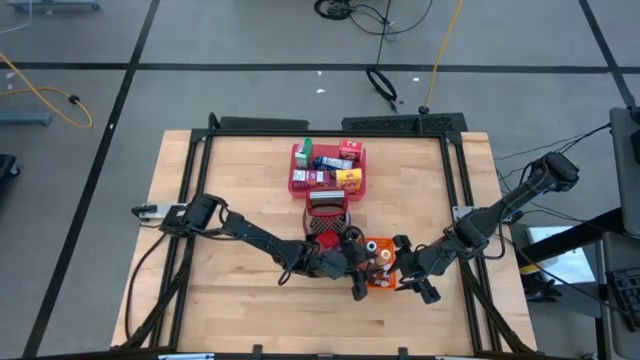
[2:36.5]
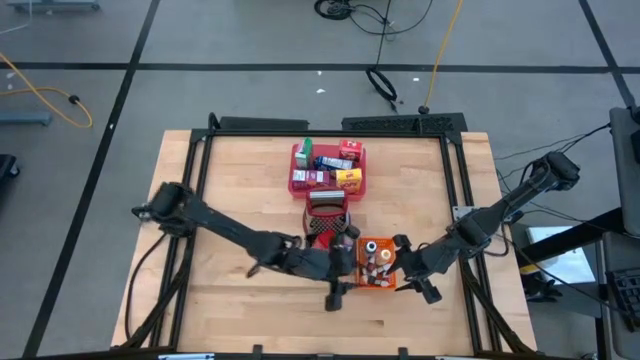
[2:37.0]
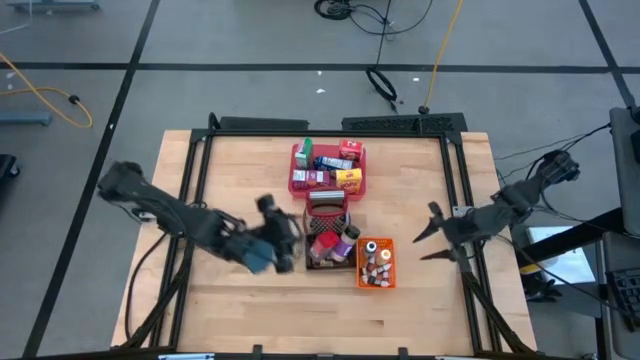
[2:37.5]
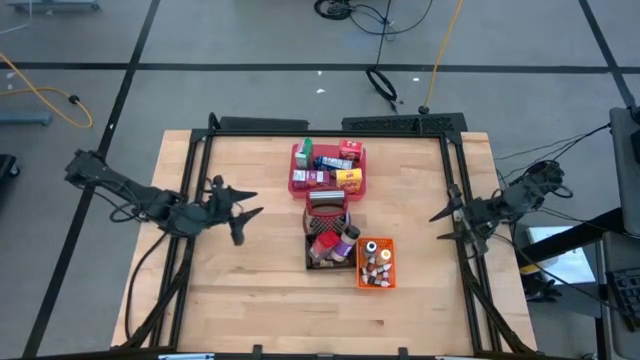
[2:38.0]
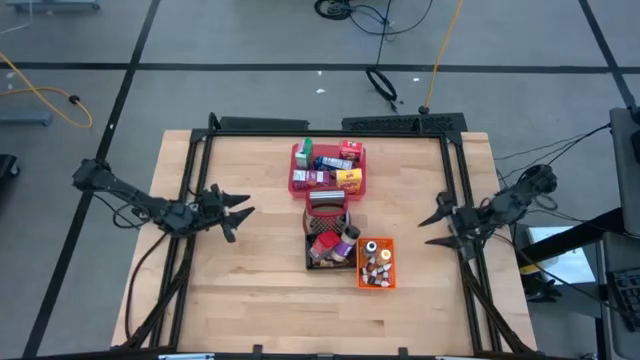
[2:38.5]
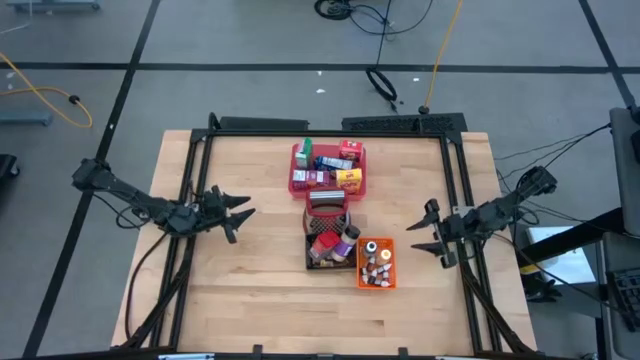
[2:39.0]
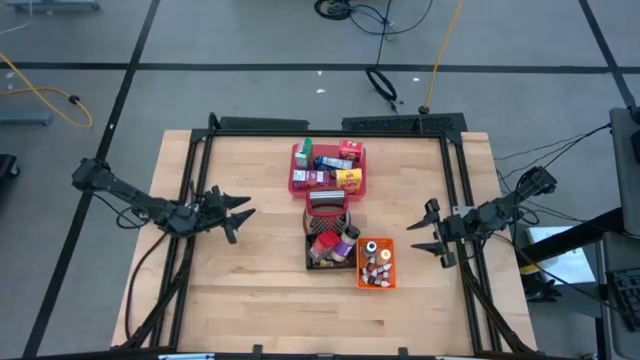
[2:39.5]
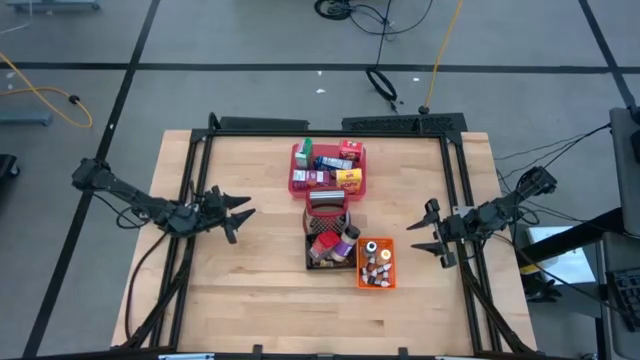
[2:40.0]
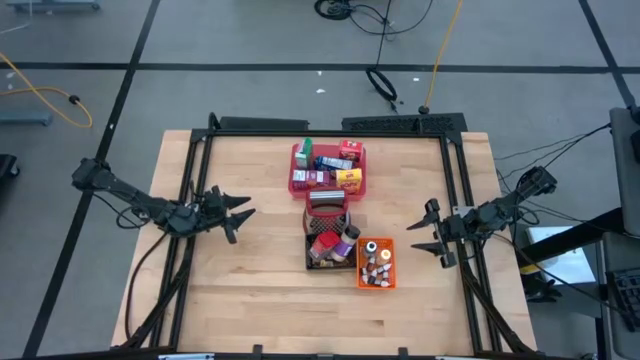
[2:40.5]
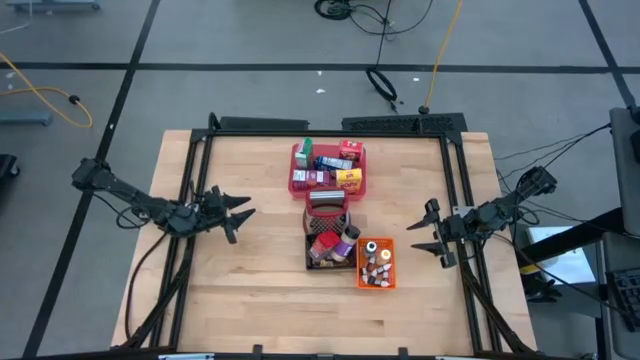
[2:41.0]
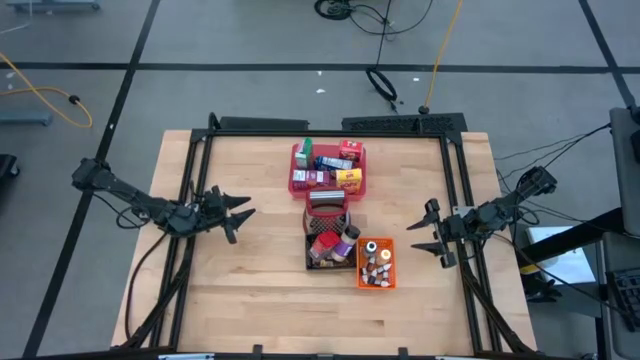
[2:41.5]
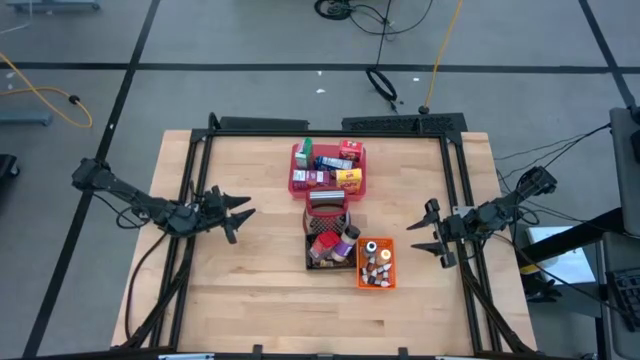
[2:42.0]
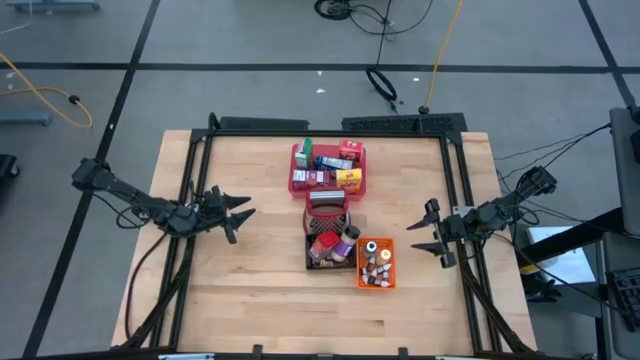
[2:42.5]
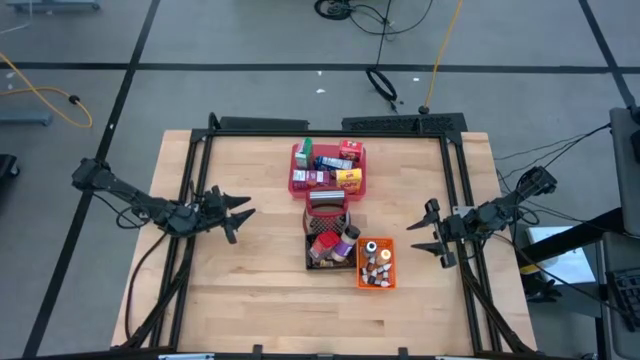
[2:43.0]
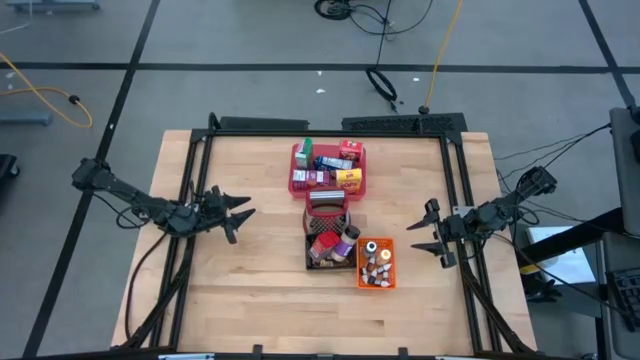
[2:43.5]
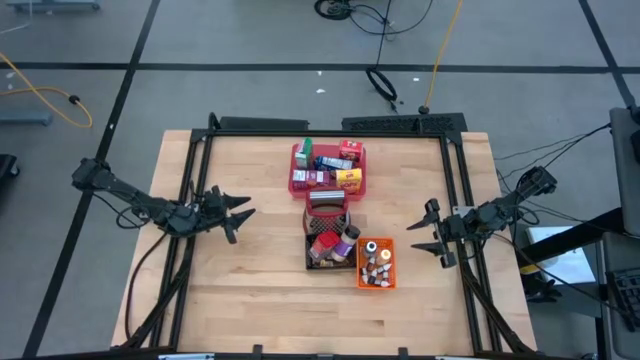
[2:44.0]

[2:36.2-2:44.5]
Task: Pick & Place Kitchen Items
Return to Home Position

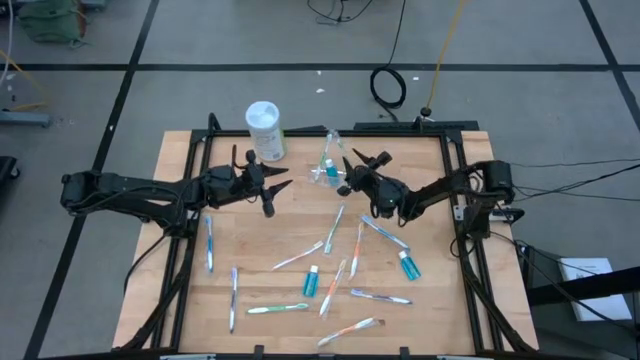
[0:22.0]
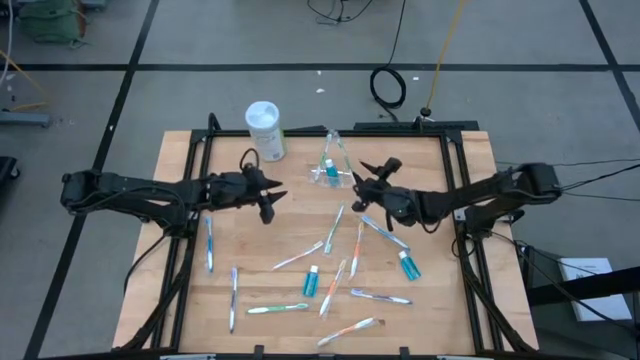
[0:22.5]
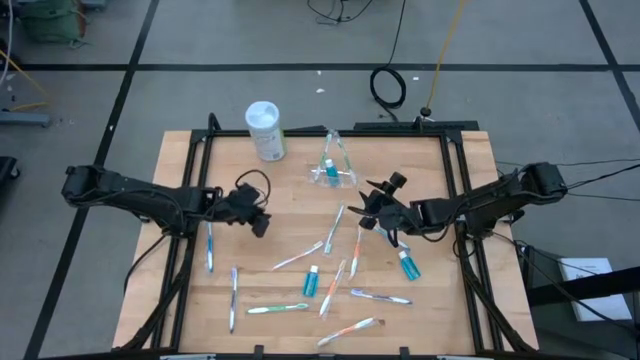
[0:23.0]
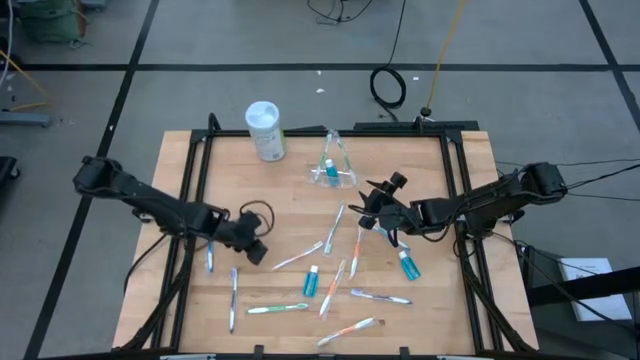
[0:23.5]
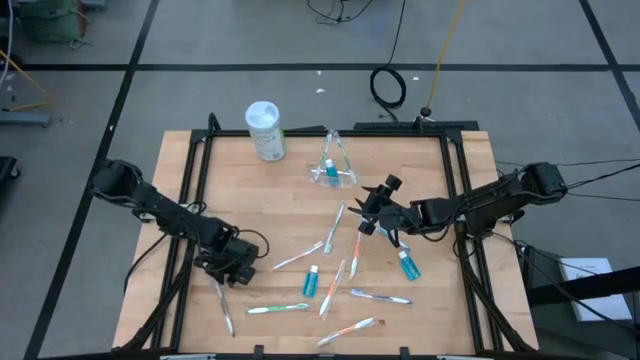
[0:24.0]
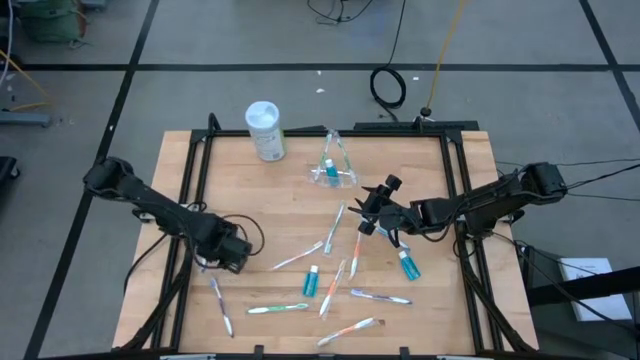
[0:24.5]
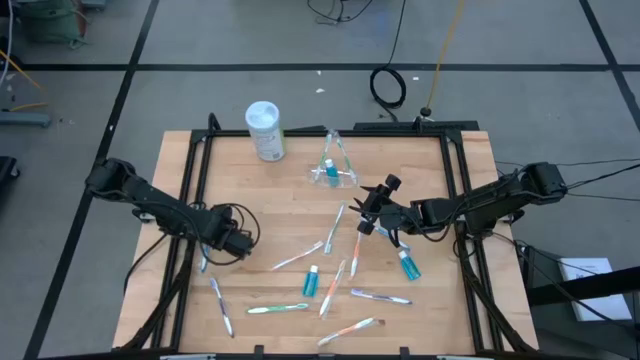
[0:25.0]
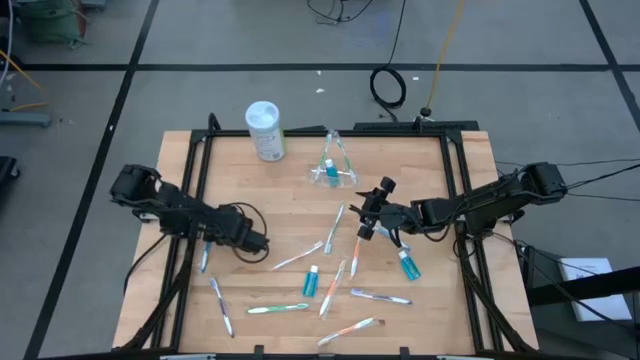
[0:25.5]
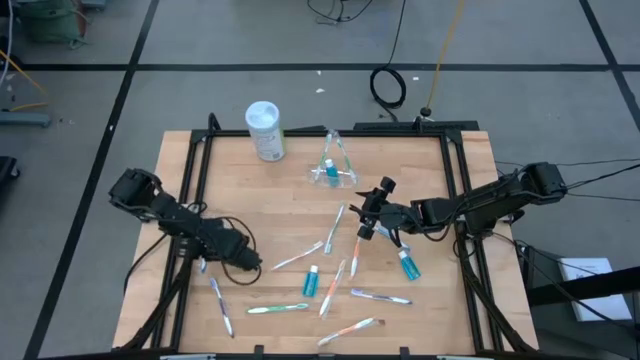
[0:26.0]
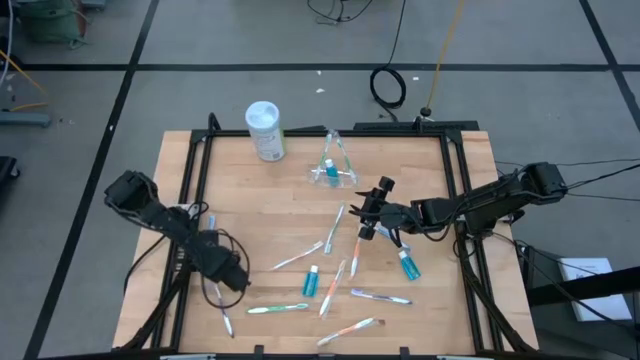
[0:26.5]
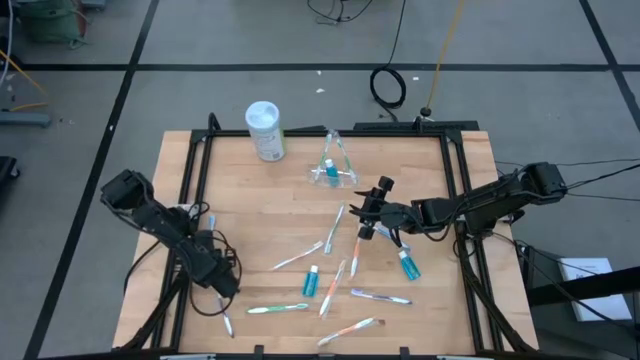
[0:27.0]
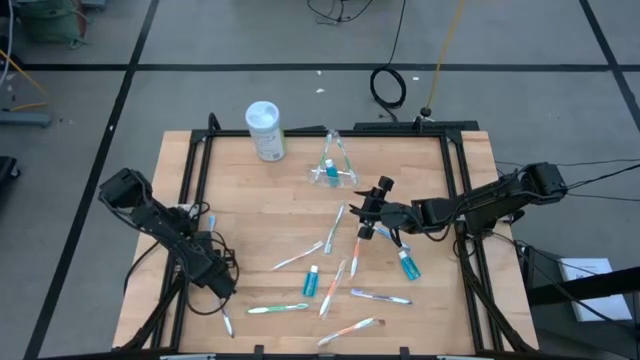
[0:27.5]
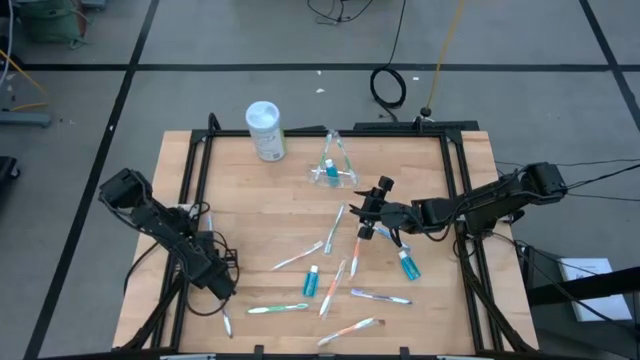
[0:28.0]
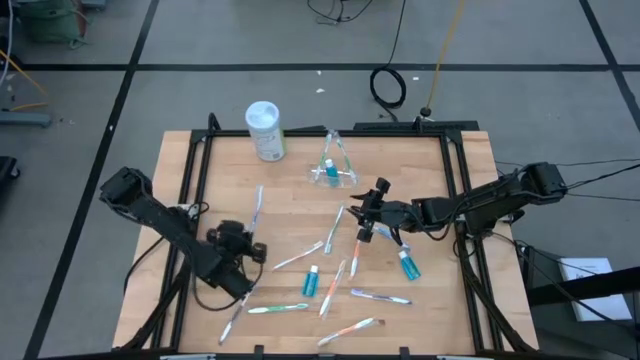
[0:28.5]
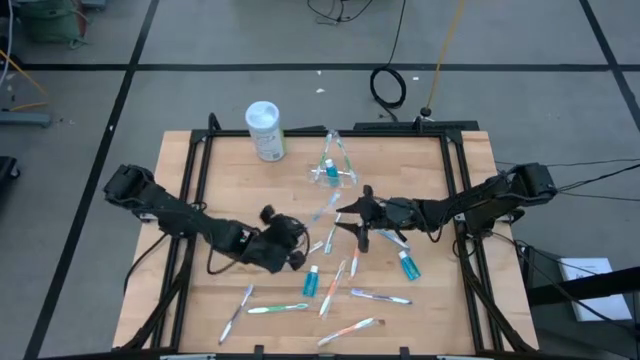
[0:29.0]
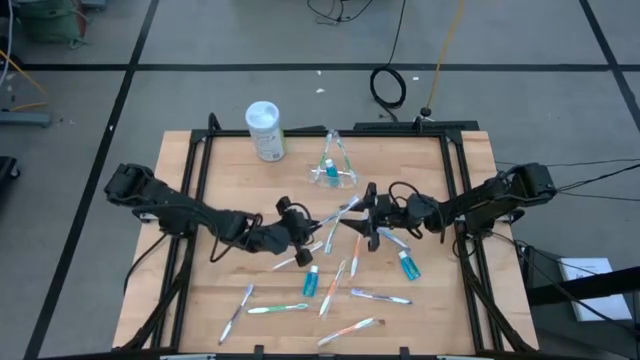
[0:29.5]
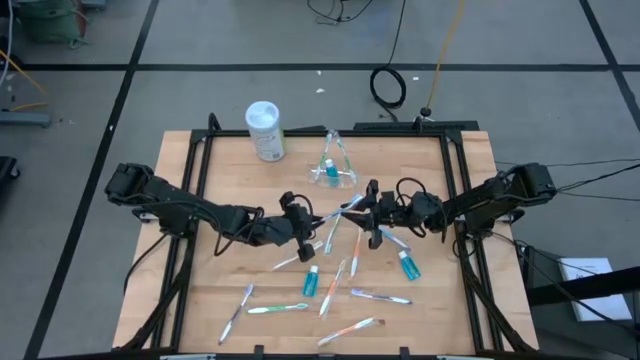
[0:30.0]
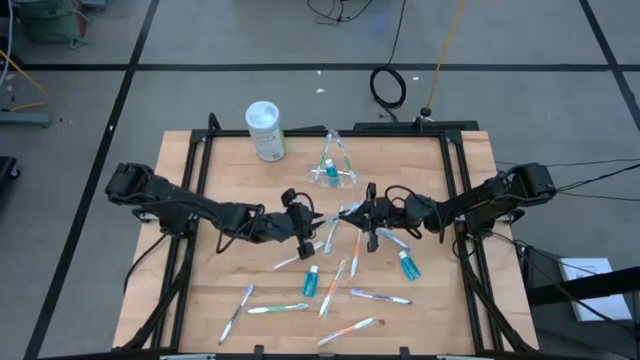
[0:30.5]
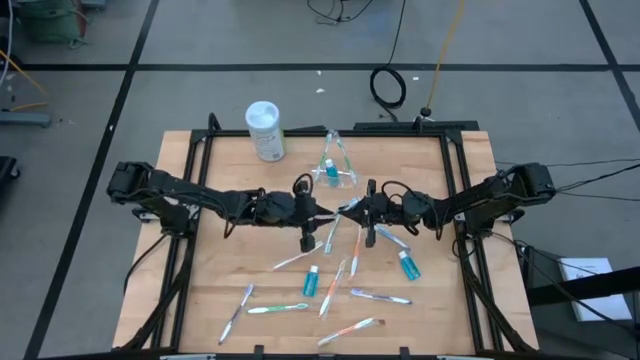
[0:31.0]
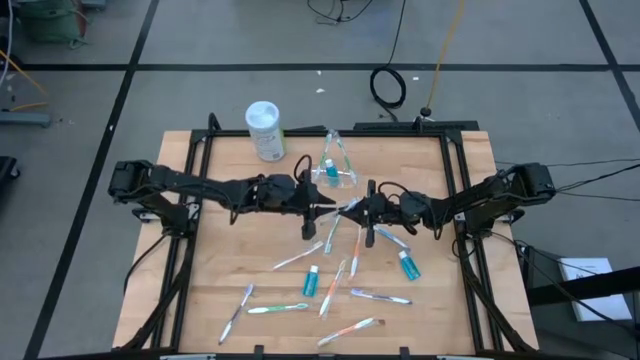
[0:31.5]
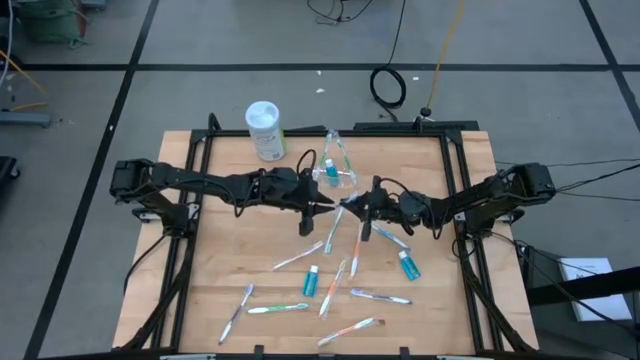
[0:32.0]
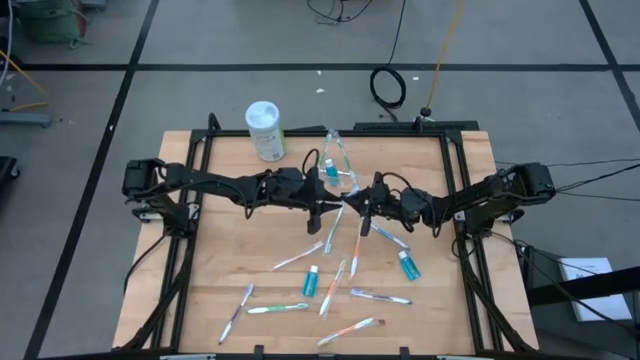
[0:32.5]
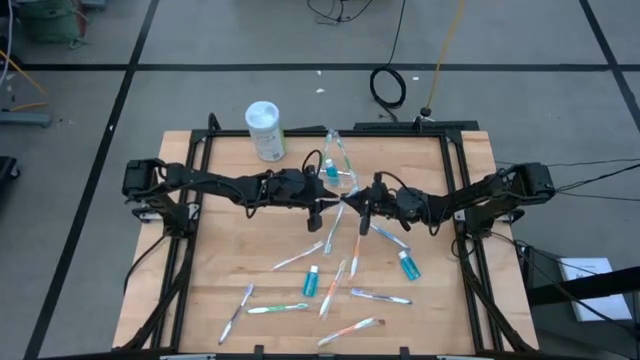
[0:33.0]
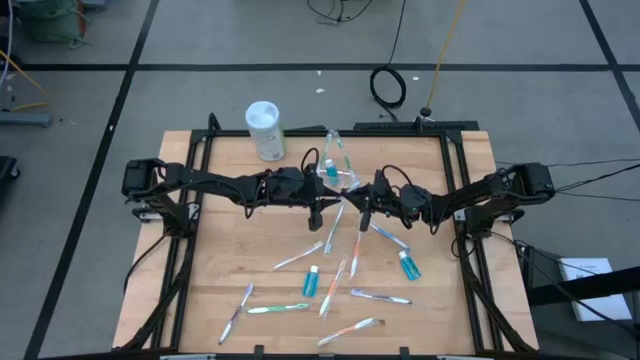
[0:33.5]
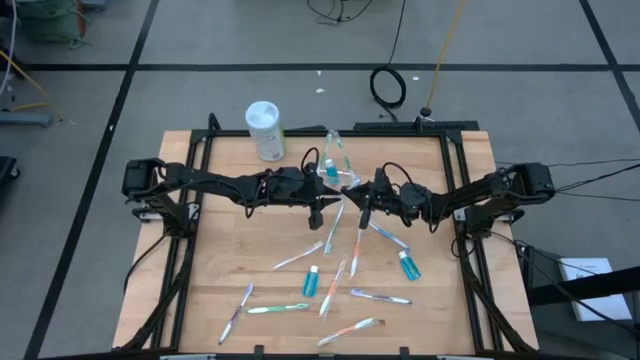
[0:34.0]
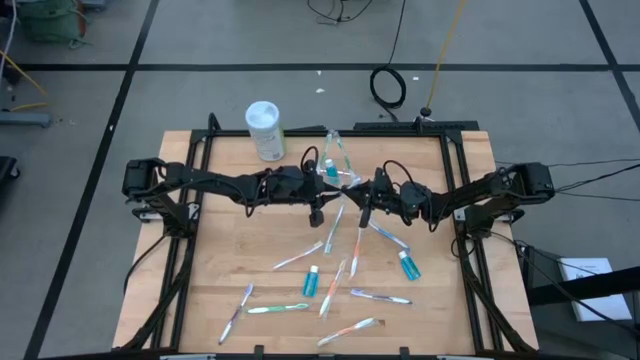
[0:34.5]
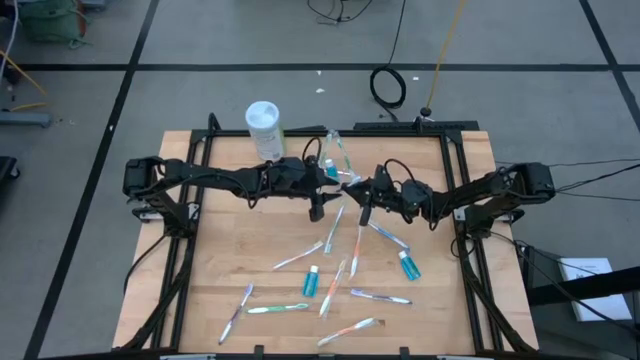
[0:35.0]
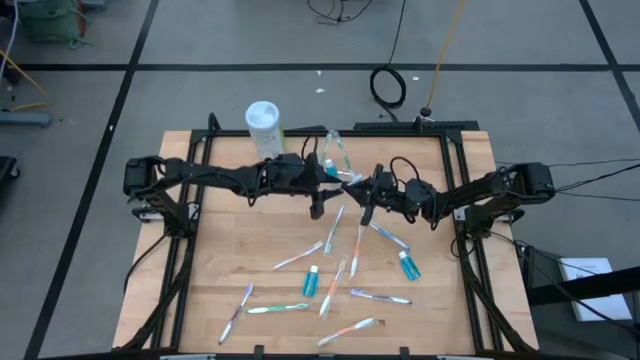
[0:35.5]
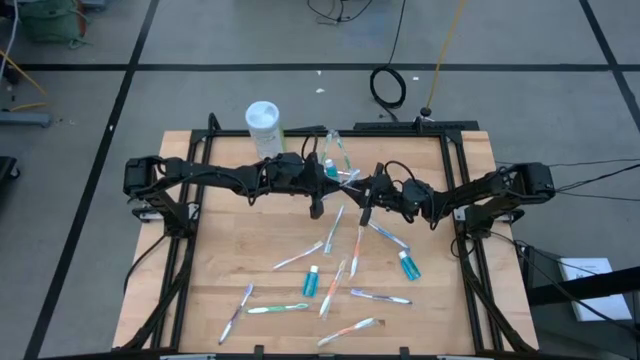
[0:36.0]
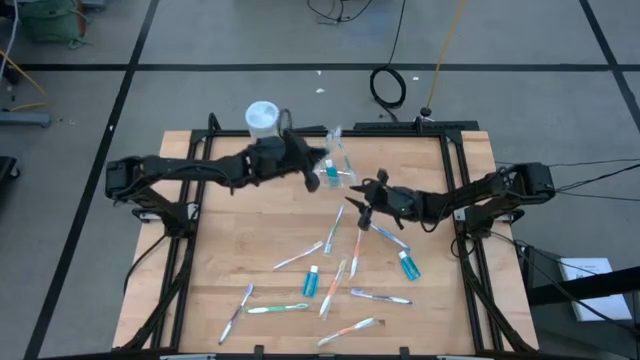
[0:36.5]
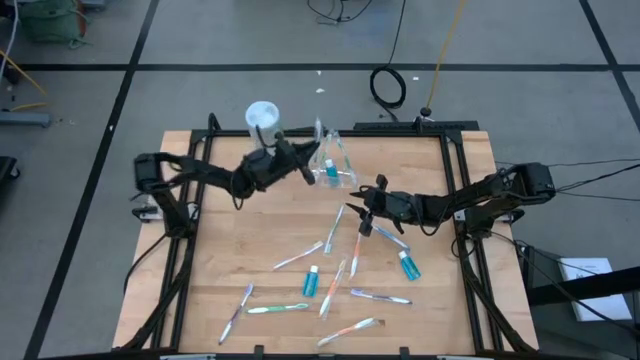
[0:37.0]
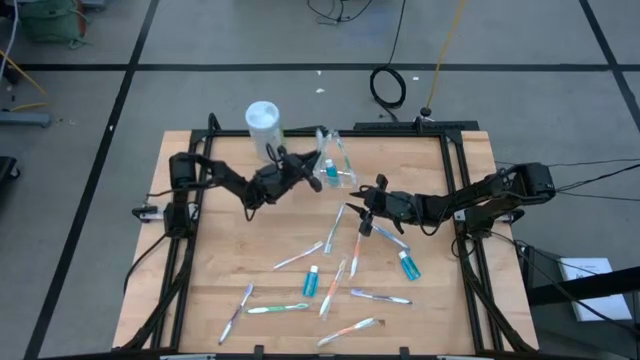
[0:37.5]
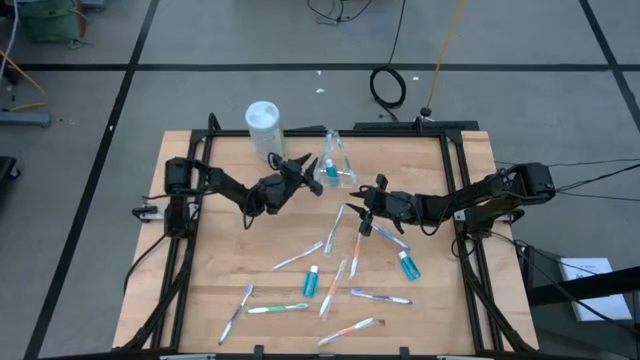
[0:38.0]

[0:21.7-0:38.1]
Task: Pick & Place toothbrushing station
Put the blue toothbrush into the transparent organizer
